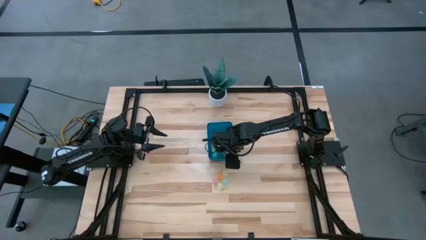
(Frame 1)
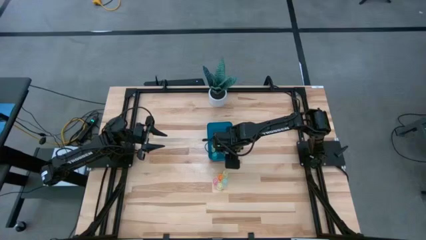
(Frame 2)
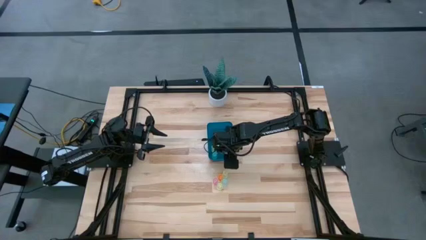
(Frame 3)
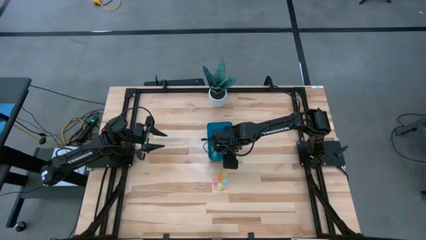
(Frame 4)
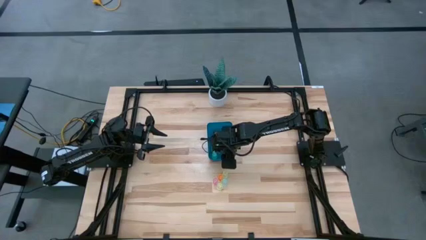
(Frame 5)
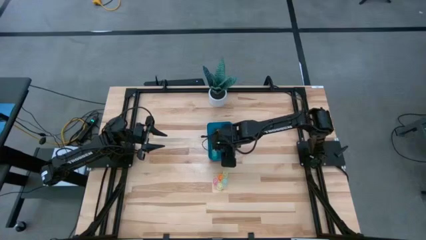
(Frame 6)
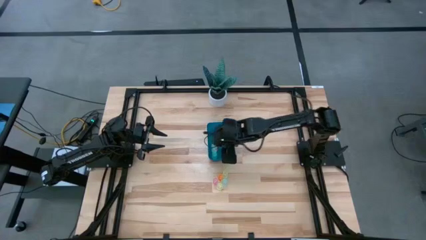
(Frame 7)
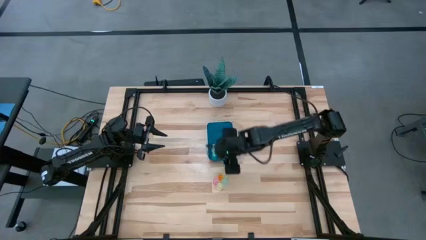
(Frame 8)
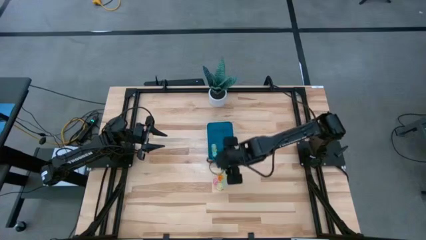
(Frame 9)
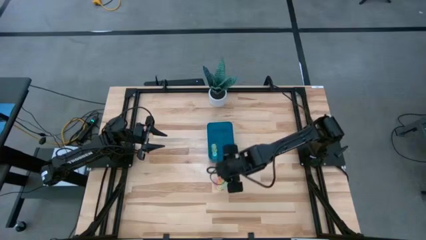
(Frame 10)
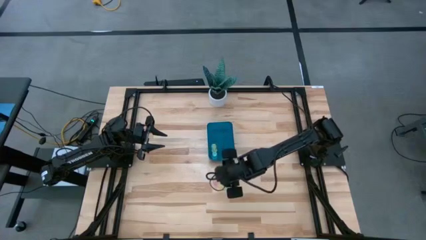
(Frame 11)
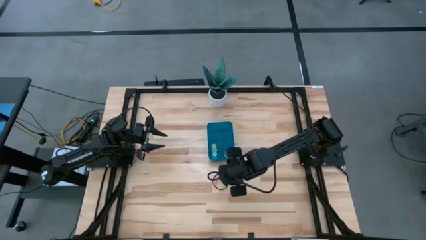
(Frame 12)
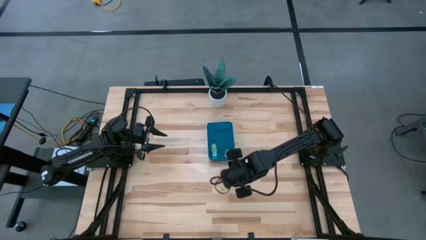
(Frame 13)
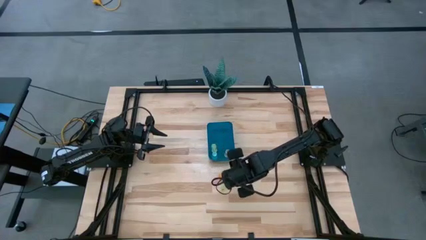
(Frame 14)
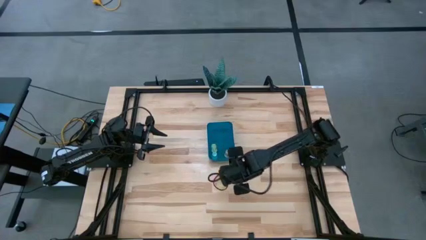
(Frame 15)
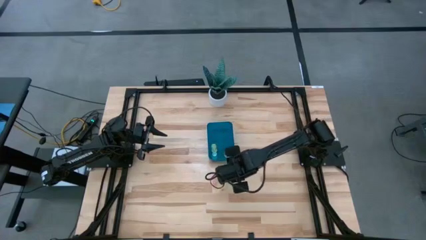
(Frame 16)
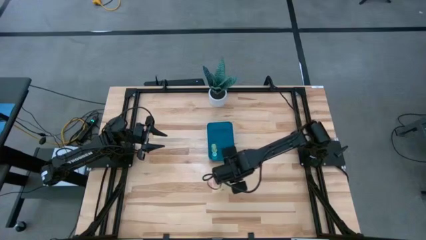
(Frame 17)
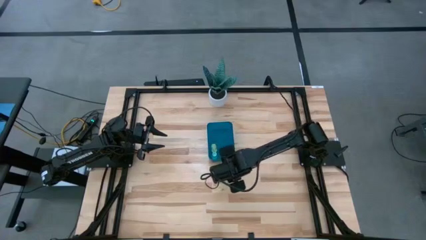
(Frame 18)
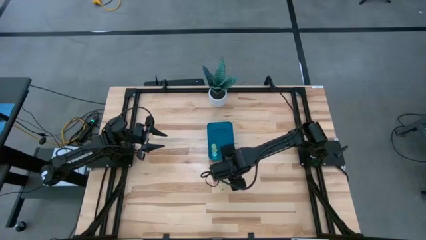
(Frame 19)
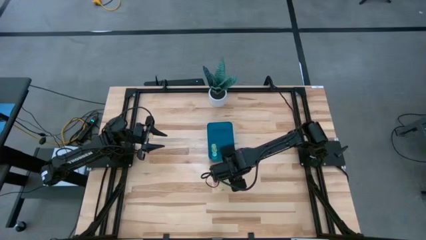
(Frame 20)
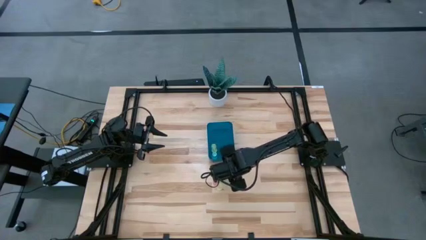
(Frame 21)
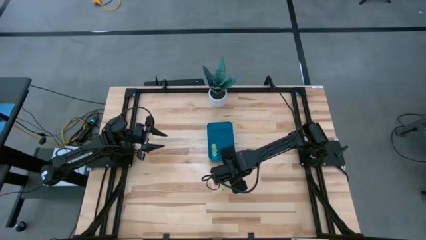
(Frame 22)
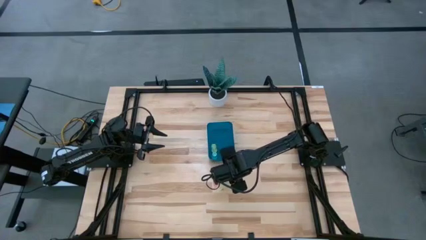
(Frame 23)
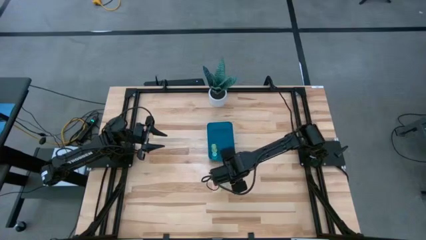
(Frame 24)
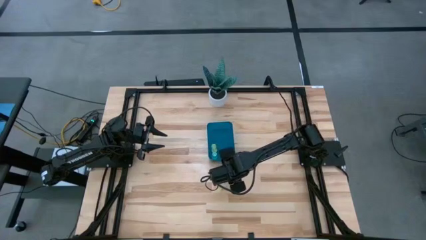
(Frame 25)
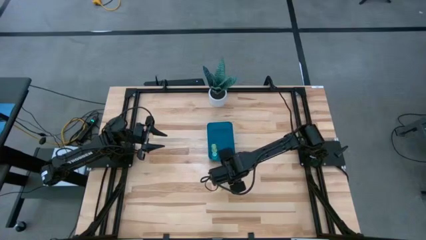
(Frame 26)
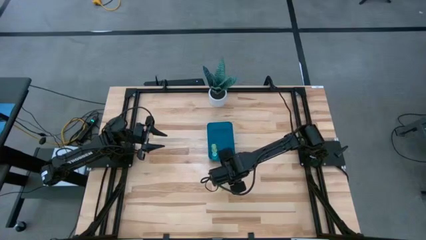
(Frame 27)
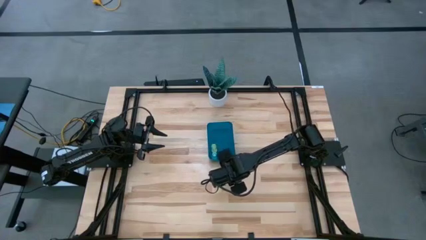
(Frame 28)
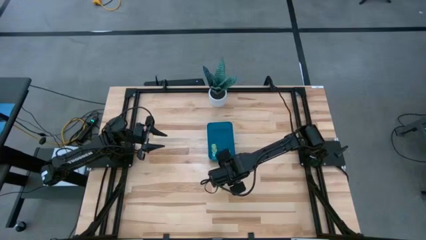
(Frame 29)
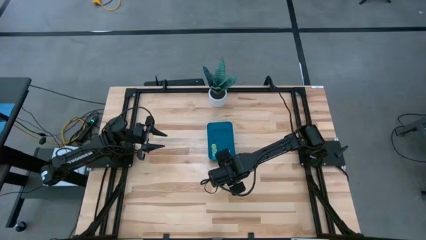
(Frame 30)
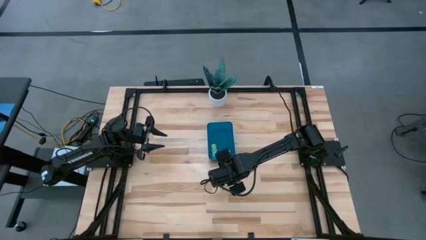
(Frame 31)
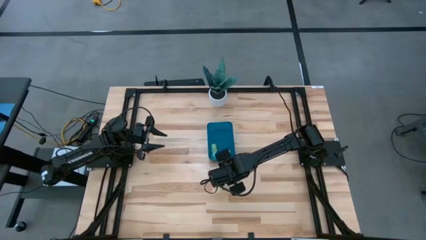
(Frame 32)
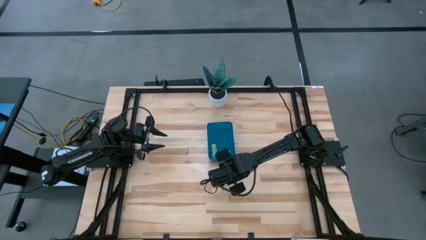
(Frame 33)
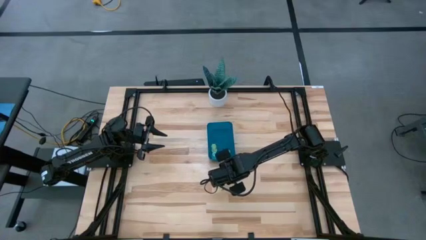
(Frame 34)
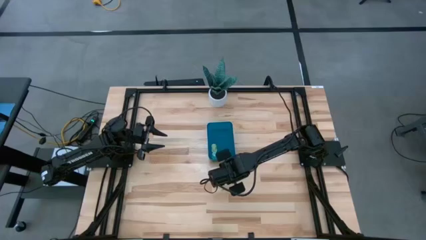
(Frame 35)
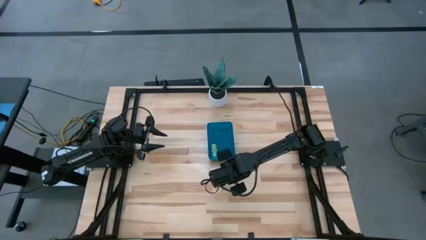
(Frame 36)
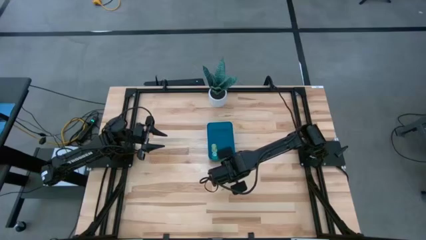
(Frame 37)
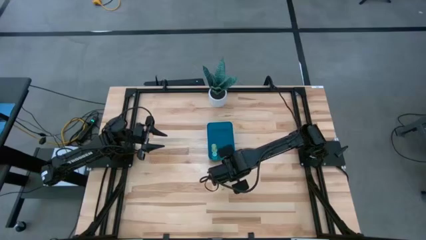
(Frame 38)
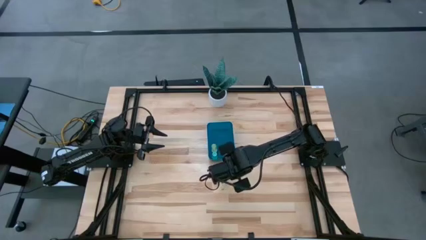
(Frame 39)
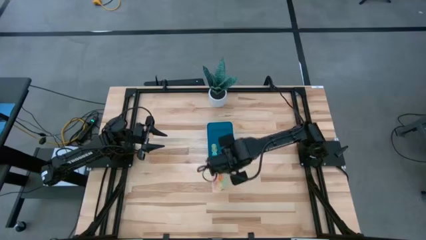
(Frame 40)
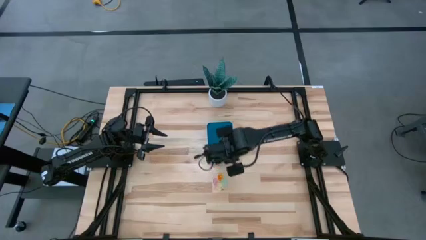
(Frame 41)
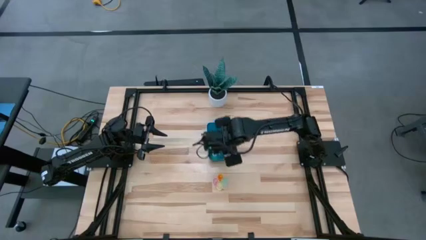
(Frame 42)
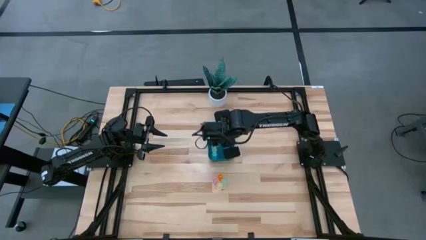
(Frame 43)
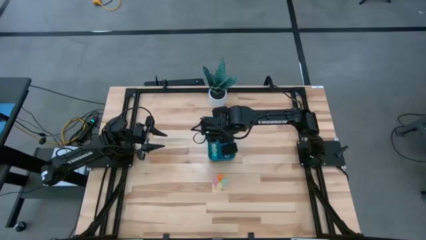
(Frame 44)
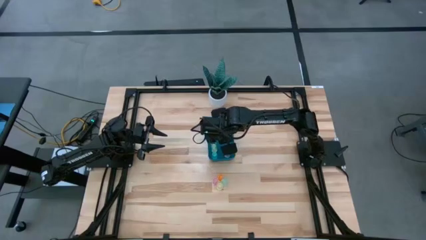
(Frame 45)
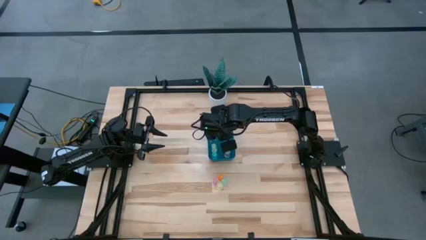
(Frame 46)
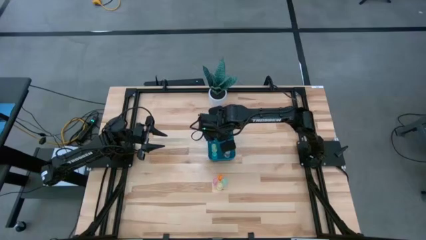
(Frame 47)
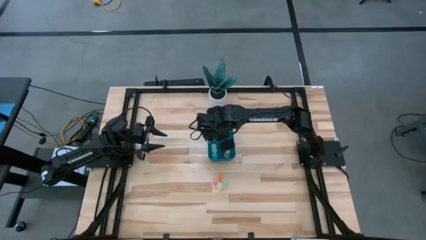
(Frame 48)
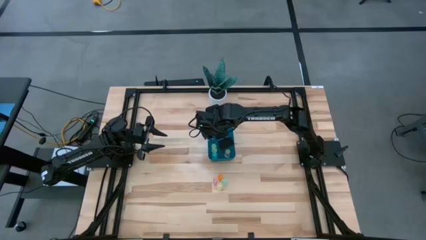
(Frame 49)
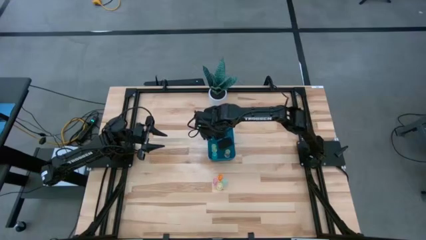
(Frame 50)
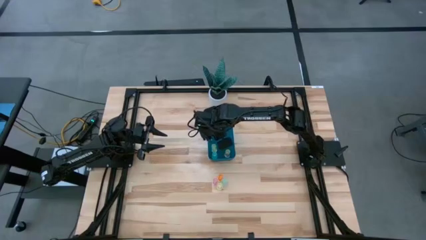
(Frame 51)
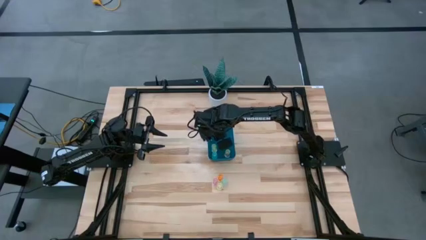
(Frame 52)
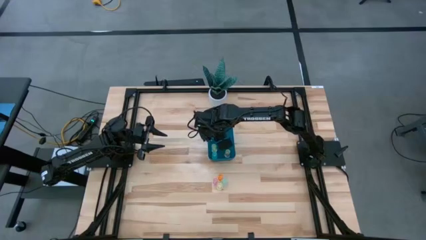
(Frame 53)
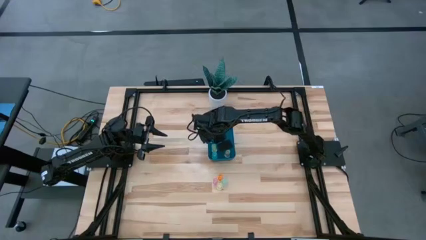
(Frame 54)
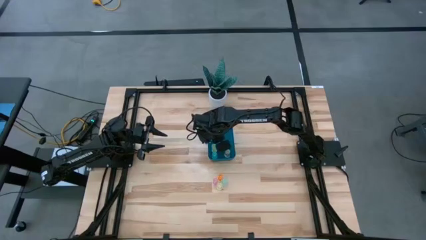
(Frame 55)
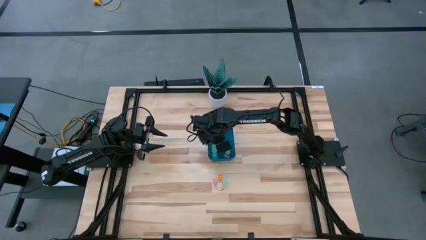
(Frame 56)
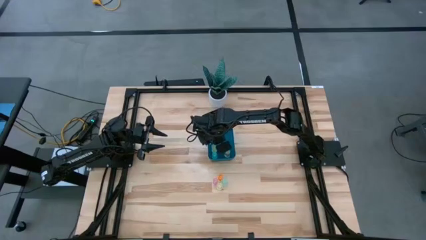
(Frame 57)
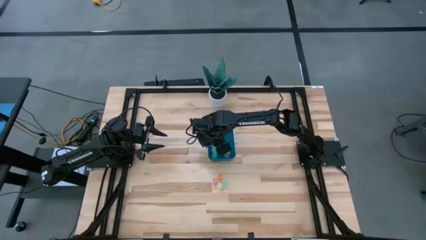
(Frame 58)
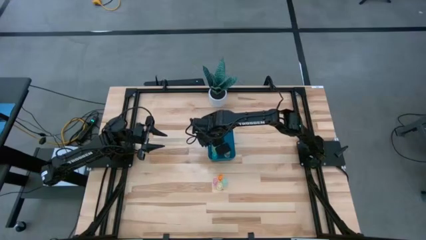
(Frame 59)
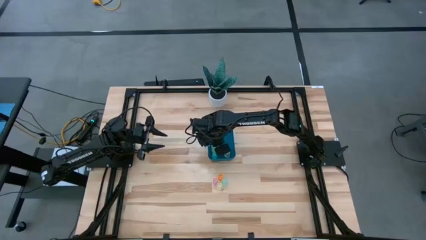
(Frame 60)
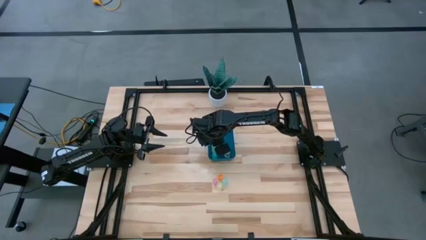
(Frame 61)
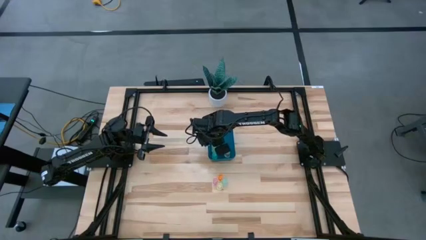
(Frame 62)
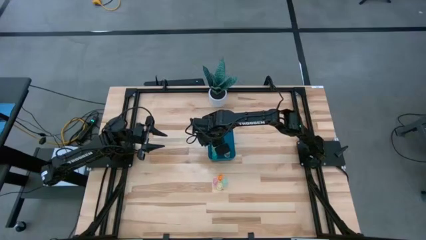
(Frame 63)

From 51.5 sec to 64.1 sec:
Task: Pick and place pill bottles into a basket
Put the yellow pill bottle into the blue container

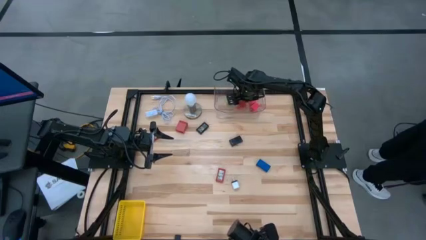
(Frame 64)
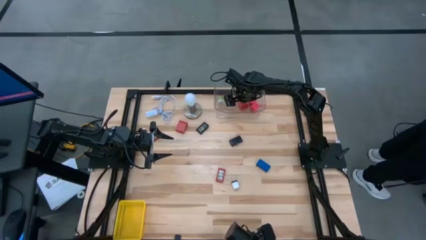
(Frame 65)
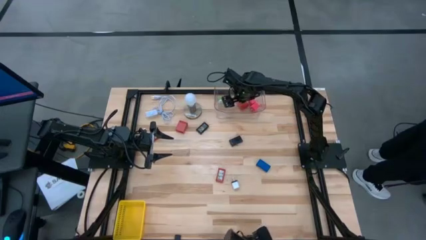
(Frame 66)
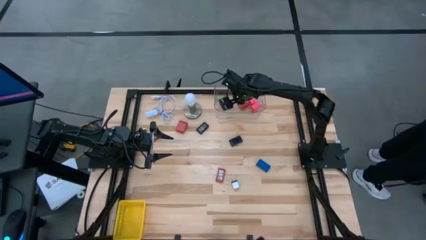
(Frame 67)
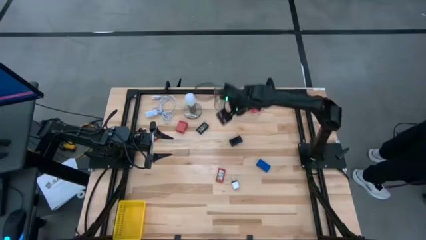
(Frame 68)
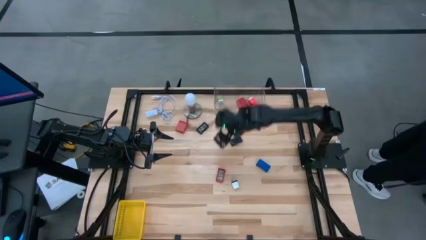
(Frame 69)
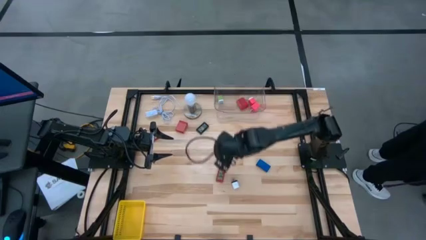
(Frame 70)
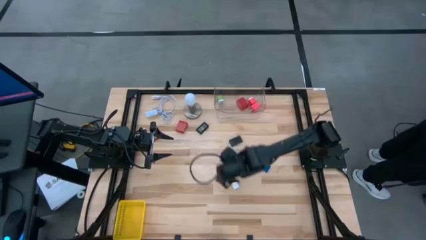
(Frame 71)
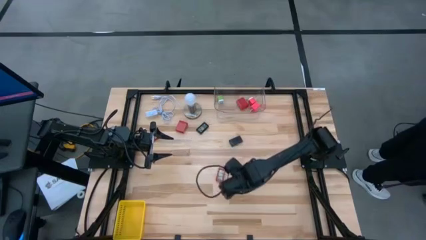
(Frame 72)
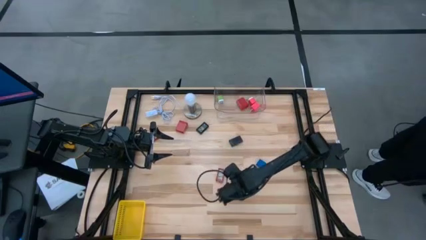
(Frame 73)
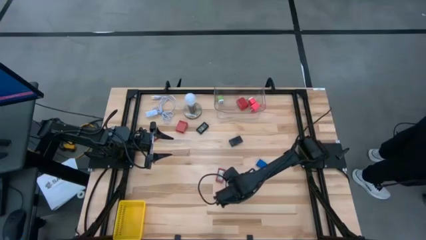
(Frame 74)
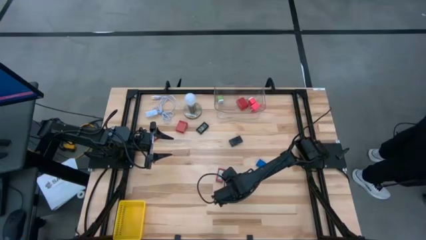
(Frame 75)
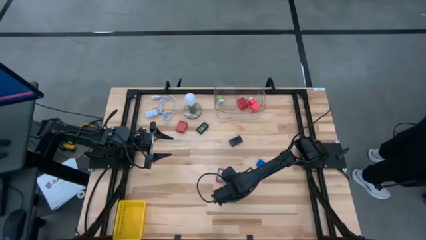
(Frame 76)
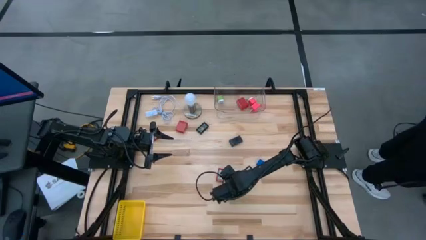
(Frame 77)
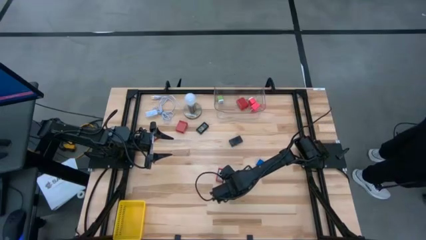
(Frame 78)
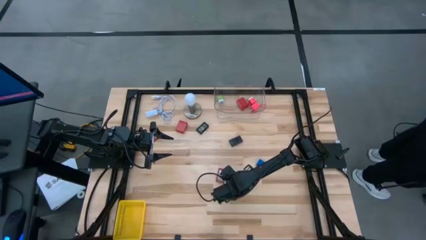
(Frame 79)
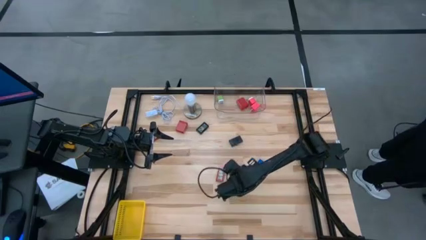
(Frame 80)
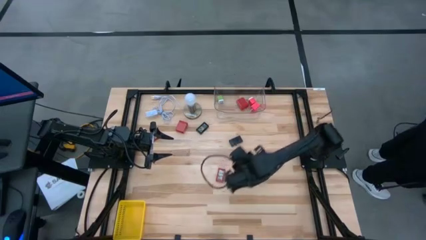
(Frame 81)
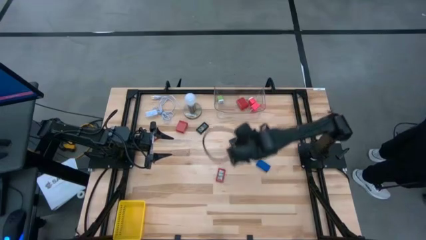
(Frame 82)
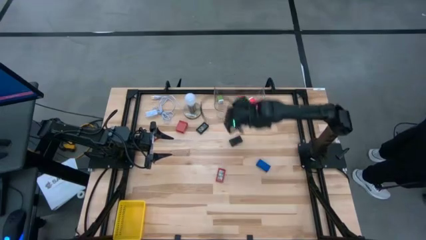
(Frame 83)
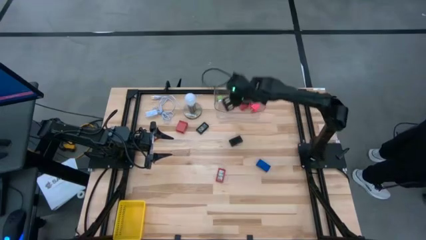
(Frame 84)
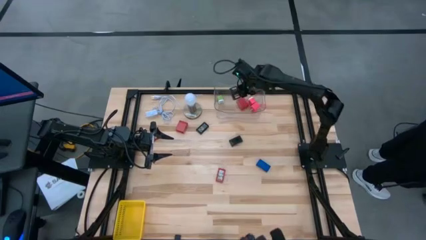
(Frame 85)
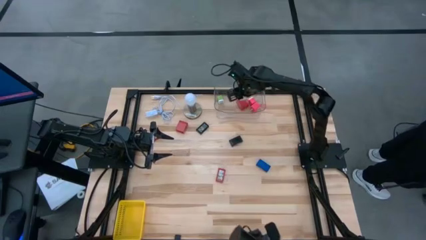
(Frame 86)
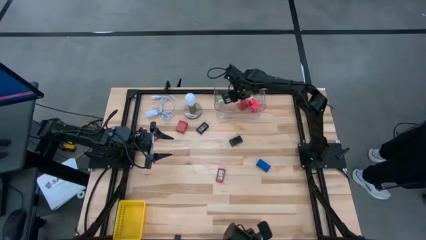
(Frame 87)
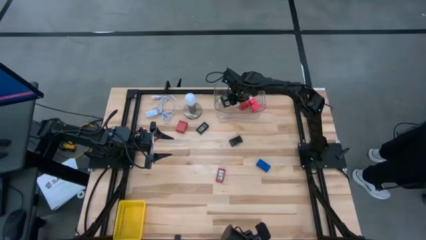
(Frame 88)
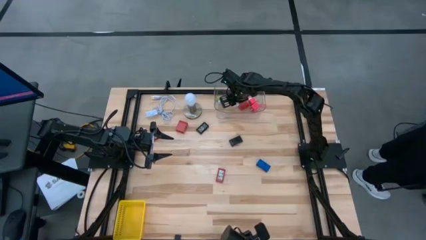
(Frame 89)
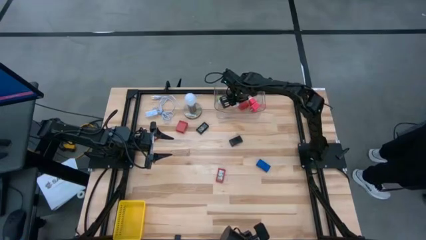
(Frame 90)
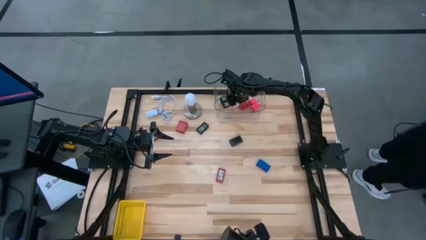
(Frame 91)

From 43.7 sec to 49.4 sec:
Task: Pick & Place Office items
Put the white and black charger adapter into the transparent bin
